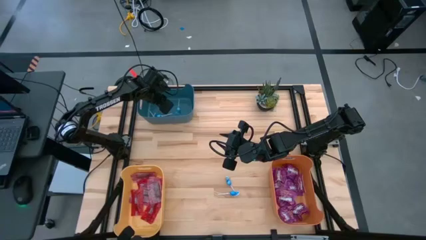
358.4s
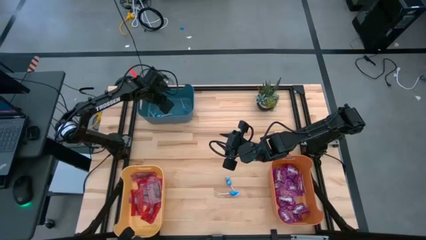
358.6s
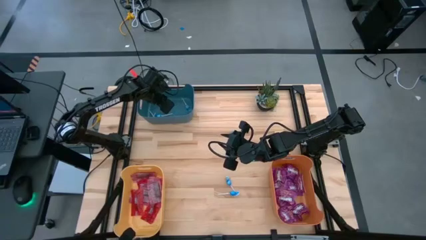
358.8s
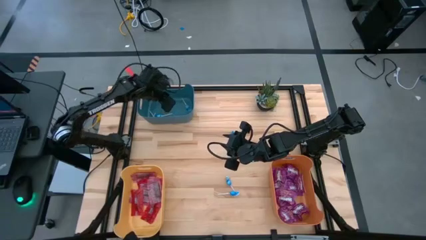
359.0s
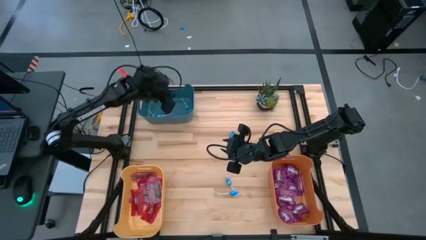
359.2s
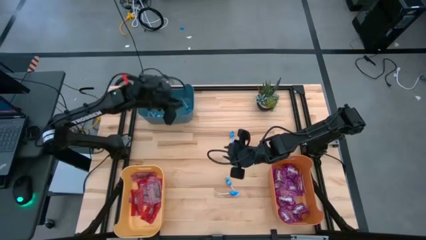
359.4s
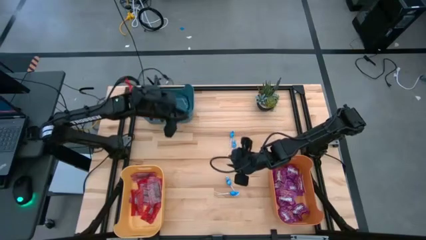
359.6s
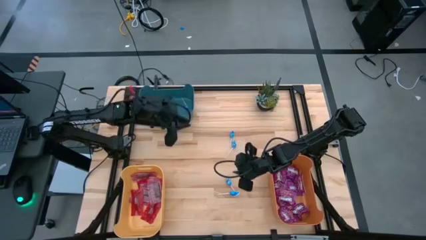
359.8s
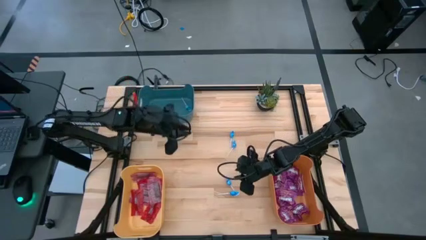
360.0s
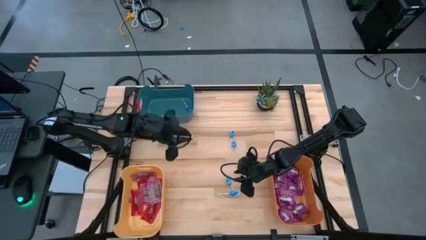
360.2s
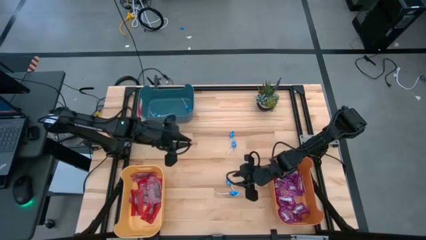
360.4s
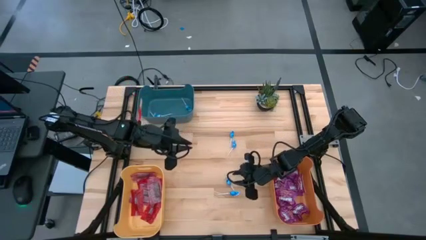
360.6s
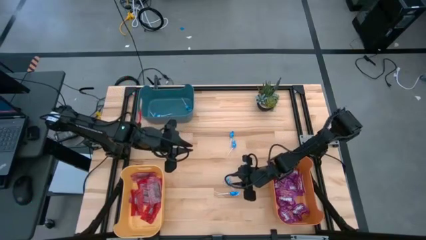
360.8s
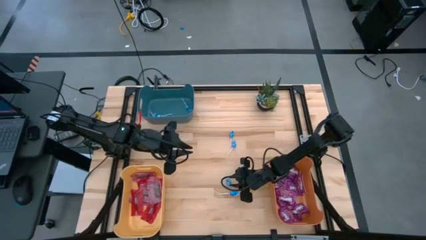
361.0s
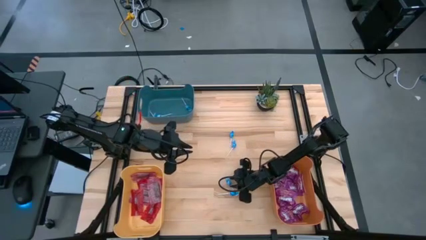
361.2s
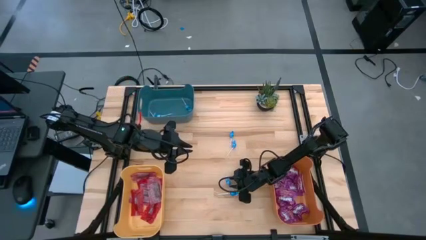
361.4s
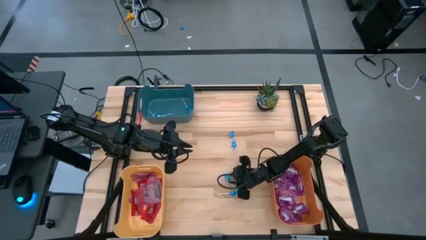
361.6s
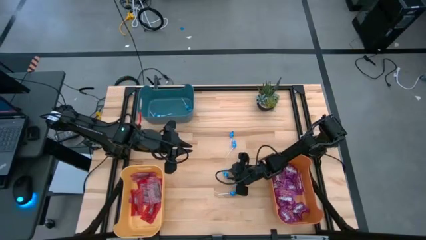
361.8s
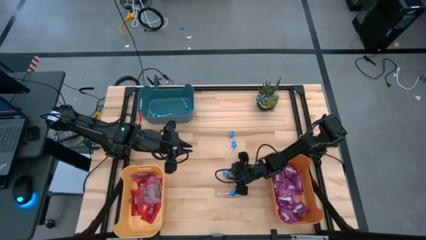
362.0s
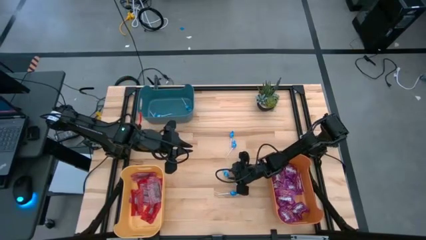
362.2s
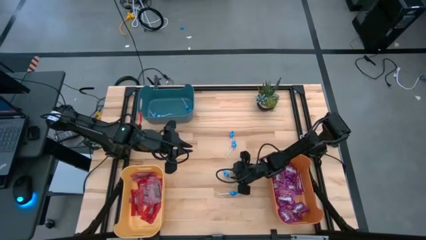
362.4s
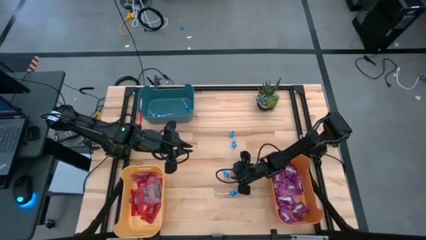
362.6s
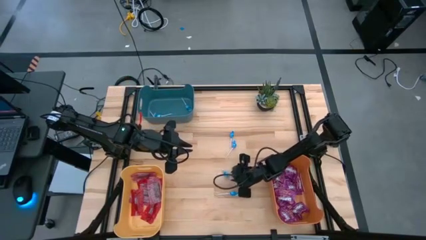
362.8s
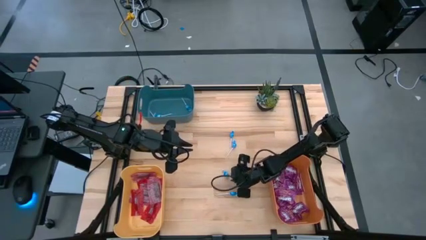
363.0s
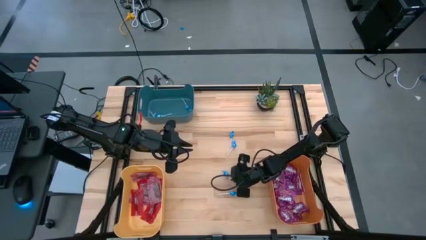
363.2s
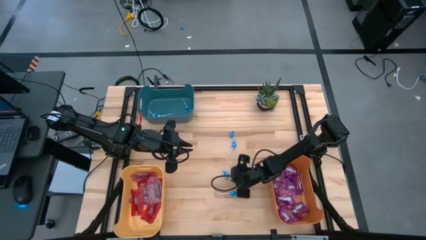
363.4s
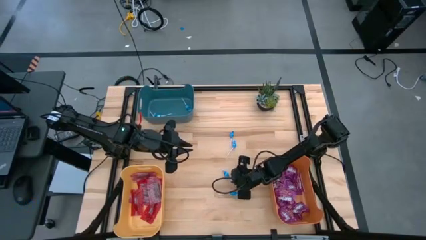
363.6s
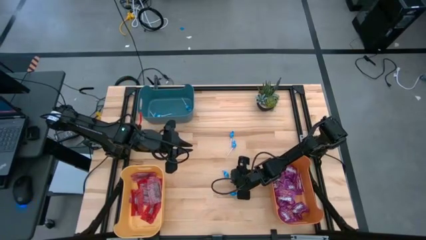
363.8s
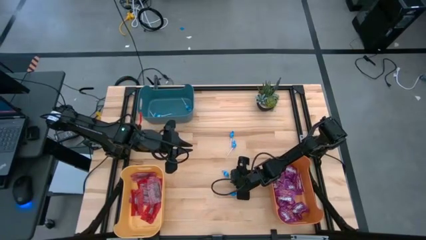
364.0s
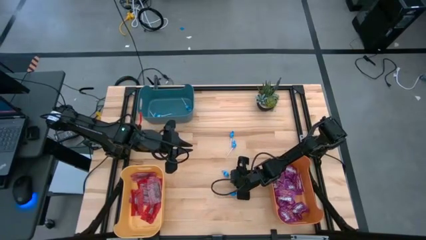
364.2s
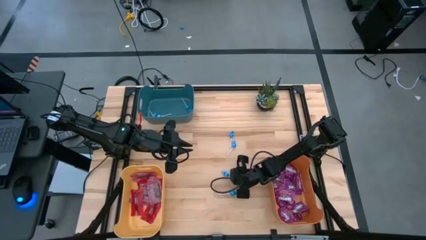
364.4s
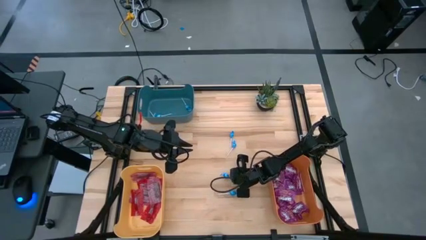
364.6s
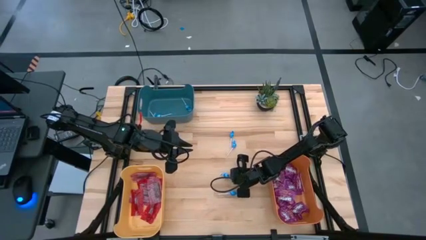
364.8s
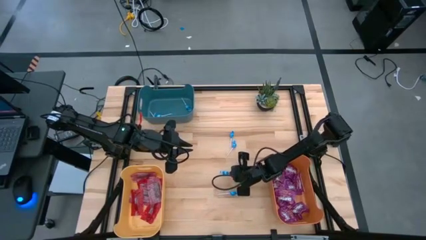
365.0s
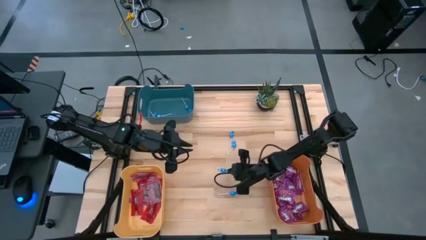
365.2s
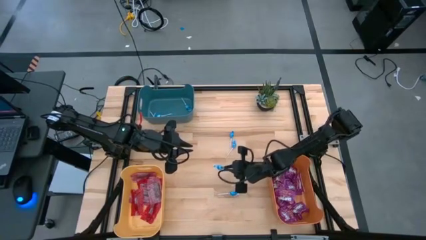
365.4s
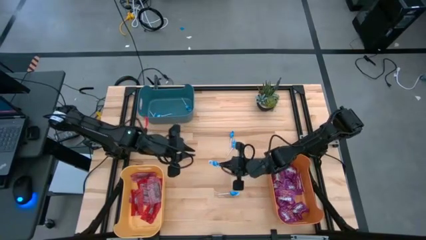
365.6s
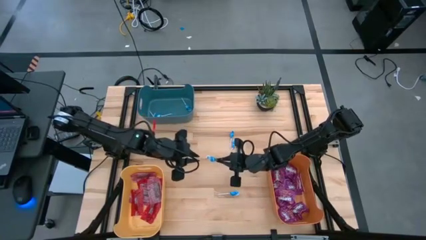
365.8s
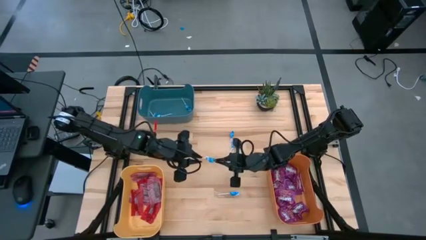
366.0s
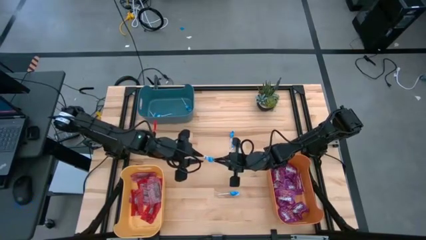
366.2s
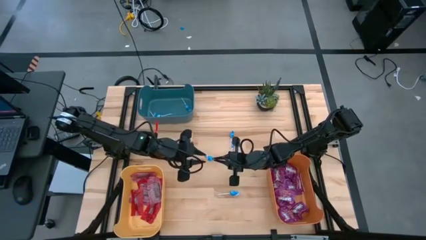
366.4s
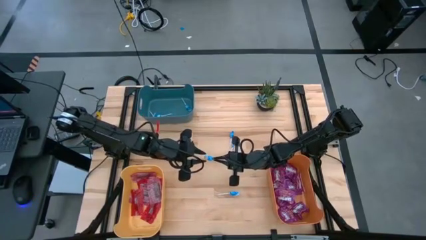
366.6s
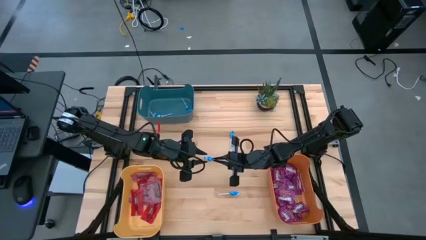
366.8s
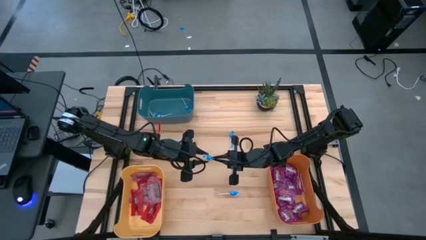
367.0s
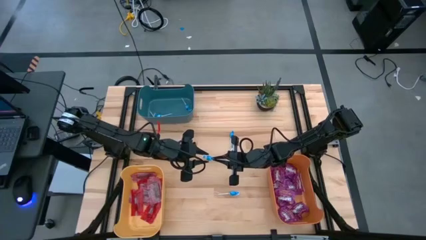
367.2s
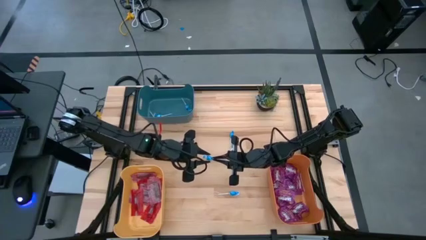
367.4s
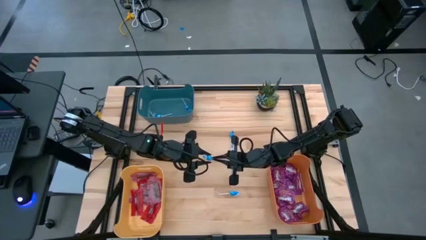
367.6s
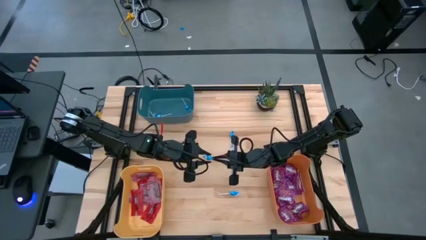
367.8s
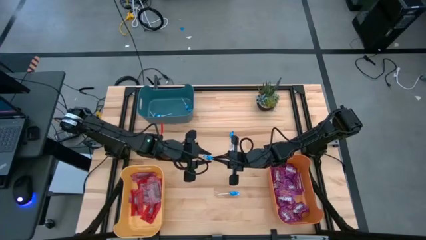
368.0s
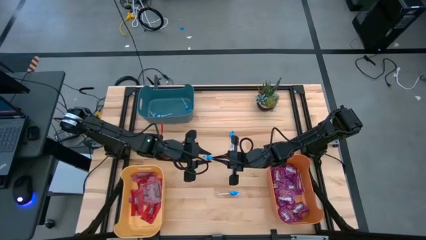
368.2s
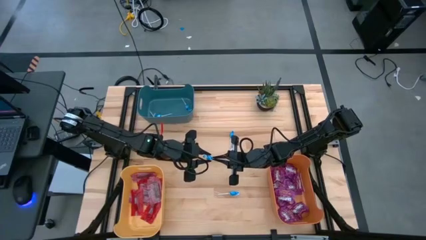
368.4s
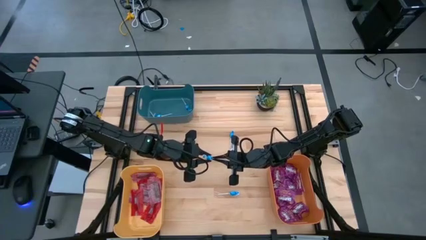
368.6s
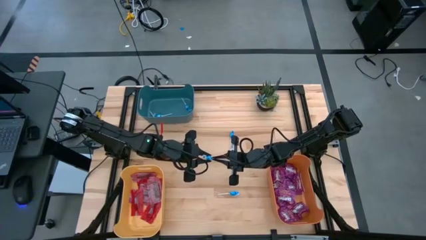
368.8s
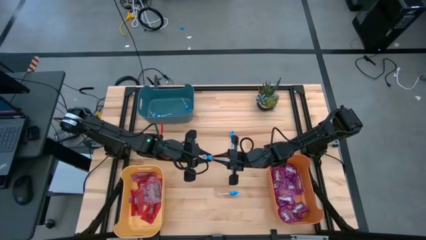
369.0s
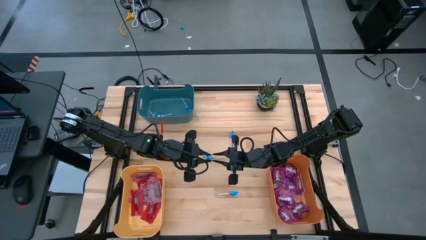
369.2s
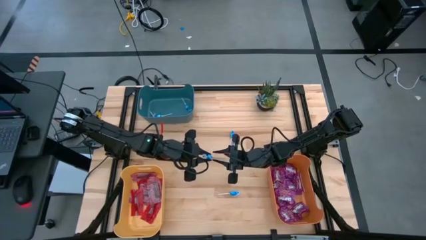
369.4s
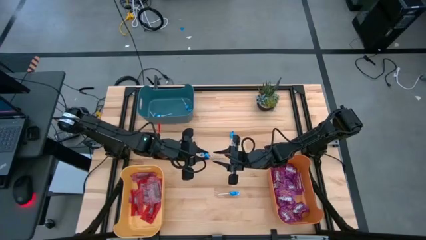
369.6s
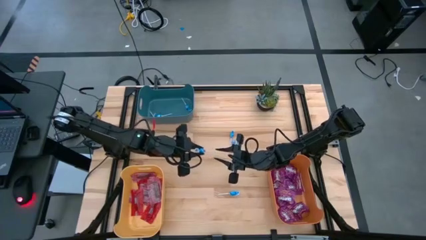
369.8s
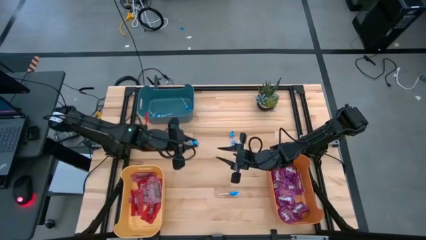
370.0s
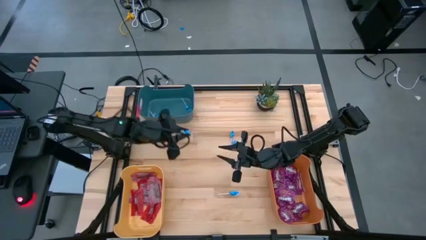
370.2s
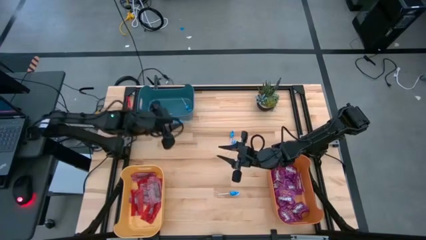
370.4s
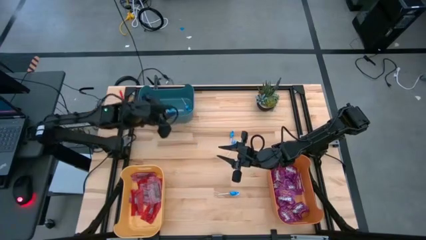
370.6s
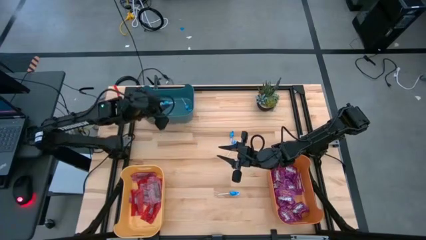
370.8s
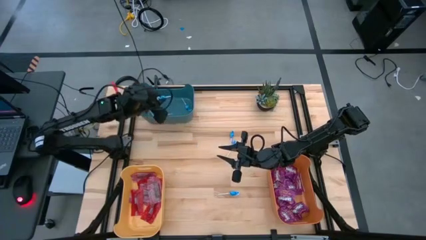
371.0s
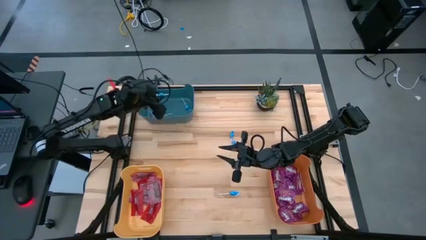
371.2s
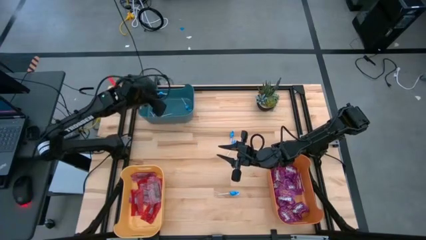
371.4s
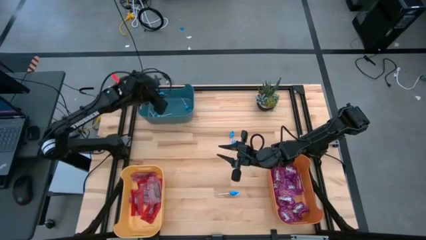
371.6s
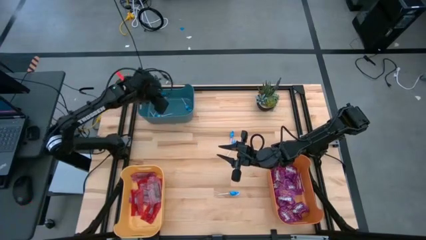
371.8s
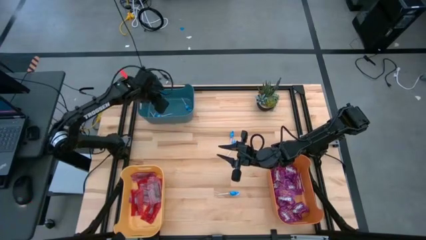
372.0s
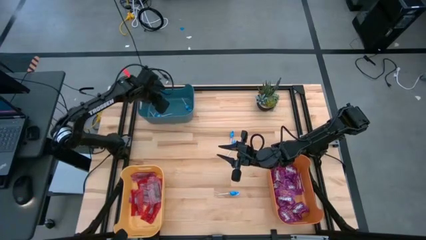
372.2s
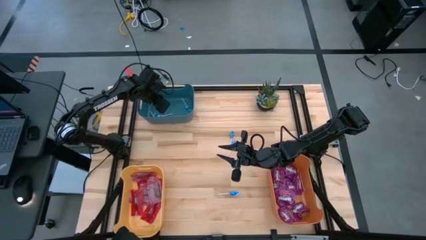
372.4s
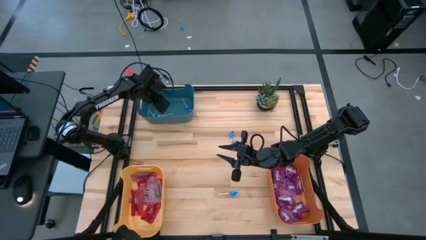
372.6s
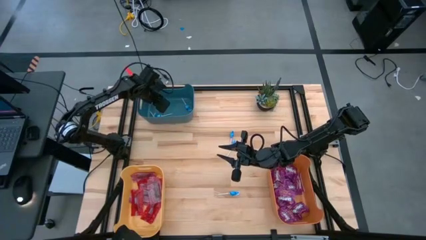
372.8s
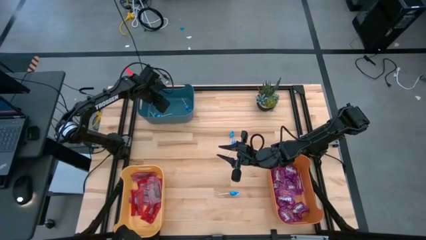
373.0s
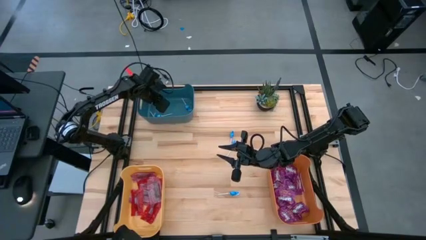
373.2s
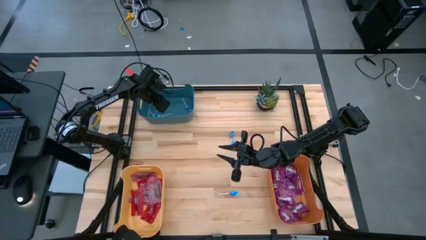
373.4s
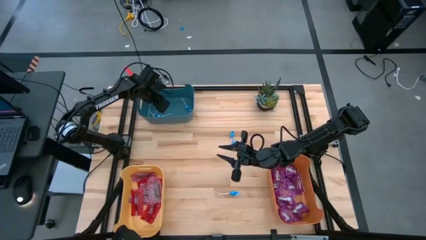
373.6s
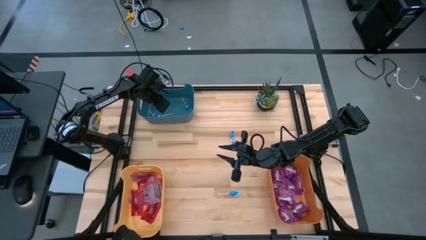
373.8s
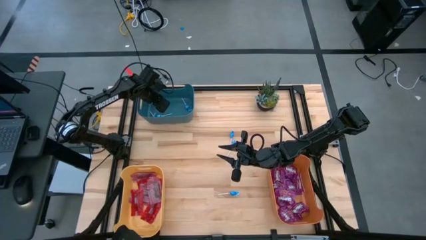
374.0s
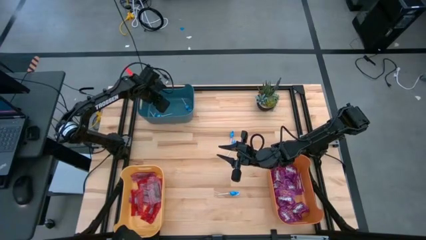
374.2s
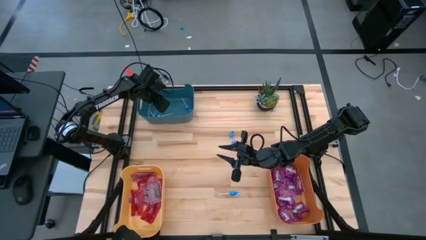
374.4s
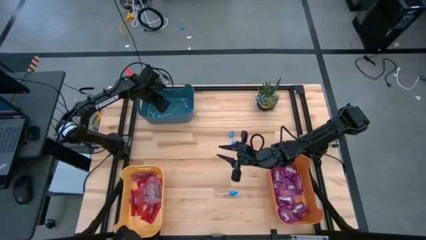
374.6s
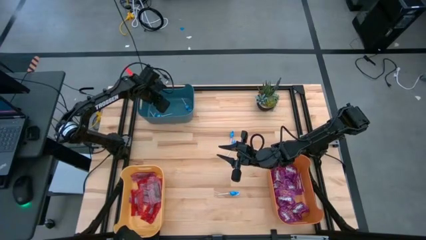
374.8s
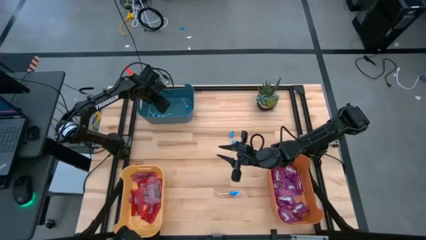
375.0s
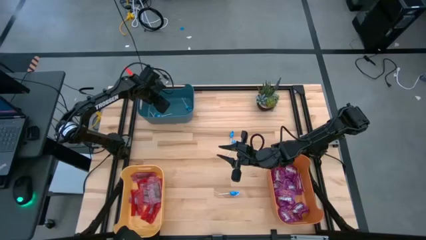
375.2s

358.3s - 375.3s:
Task: Sort candy
Put the blue candy into the blue bin

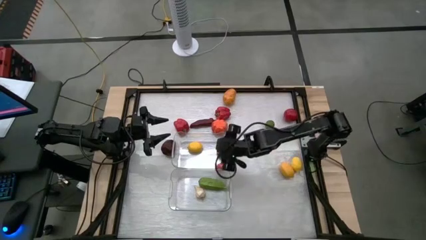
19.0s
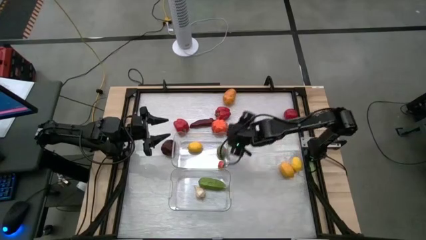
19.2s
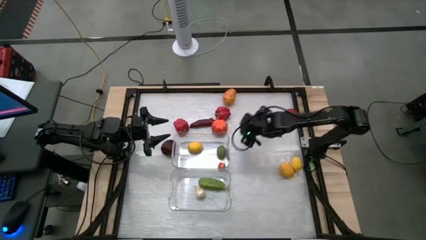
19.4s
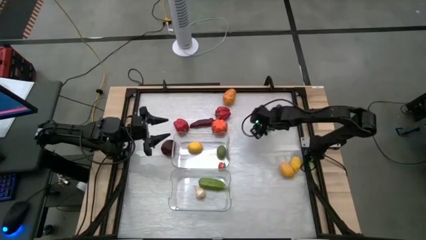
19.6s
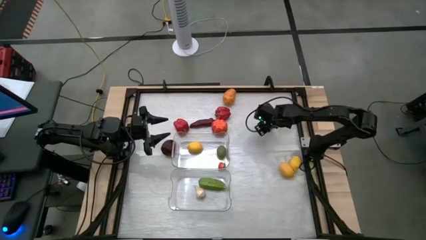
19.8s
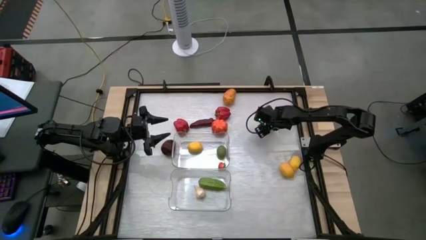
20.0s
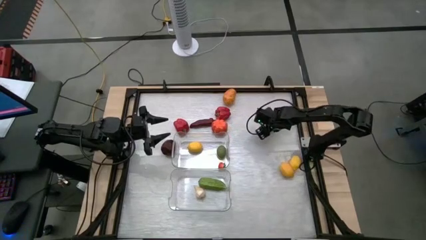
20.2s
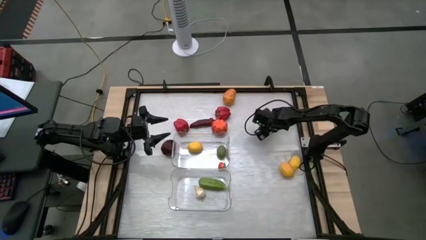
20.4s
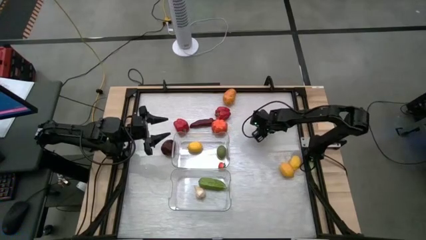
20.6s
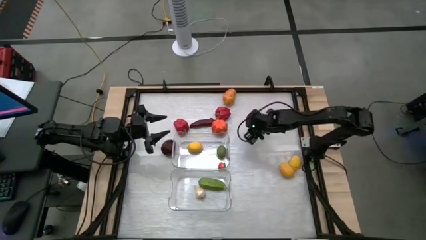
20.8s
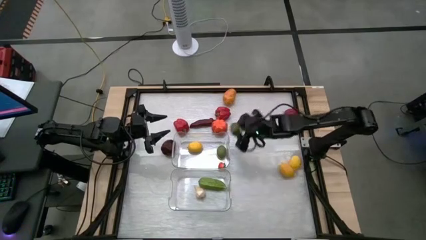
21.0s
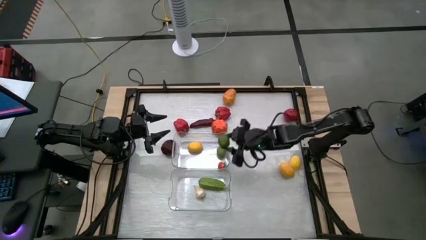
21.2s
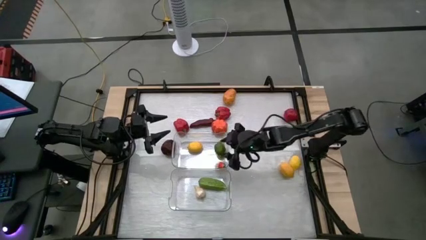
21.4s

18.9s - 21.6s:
Task: Sort produce into baskets
Put the lime into the top transparent bin
